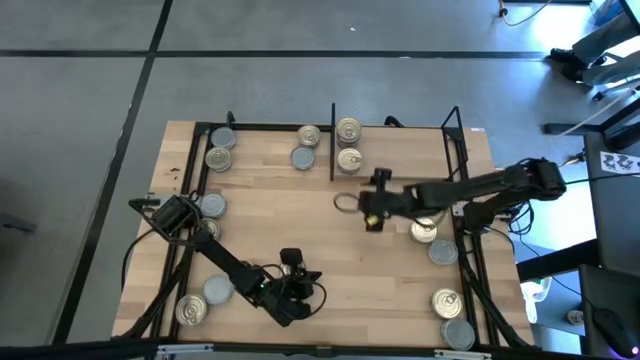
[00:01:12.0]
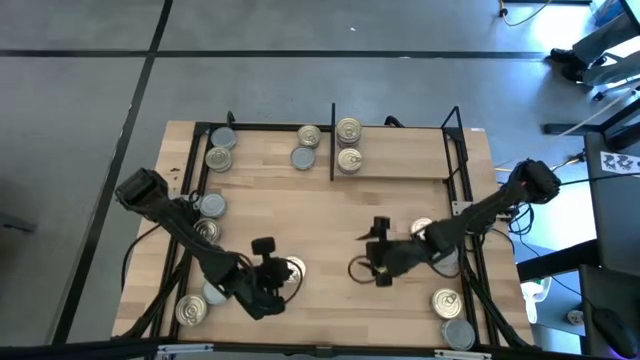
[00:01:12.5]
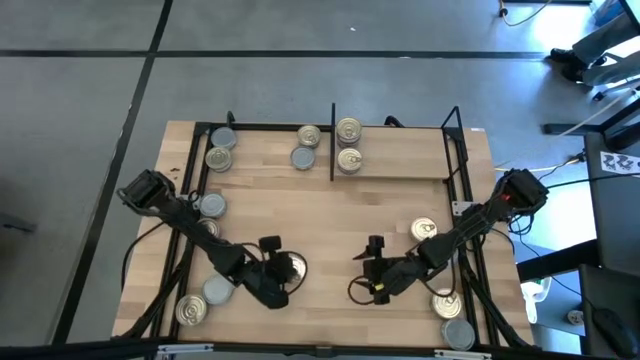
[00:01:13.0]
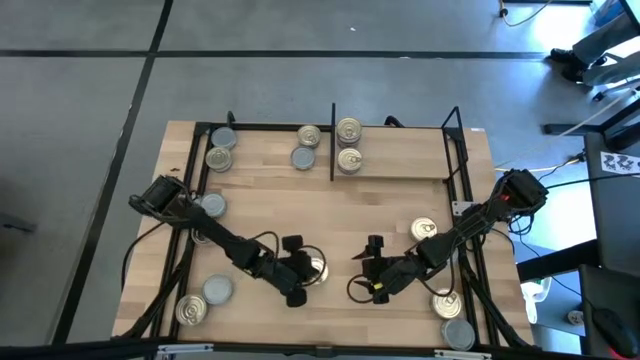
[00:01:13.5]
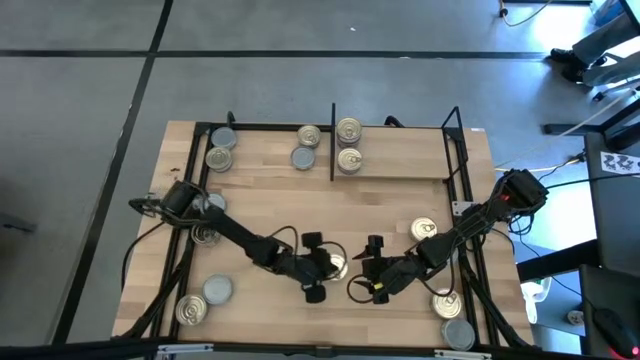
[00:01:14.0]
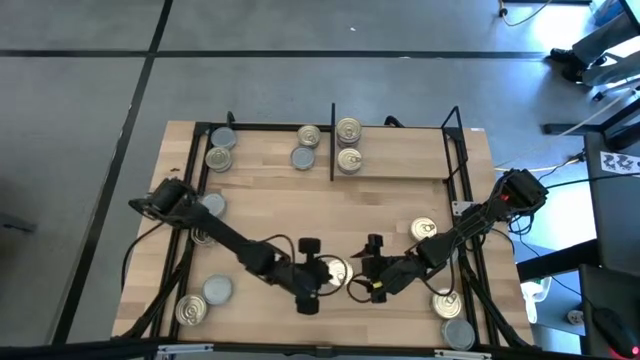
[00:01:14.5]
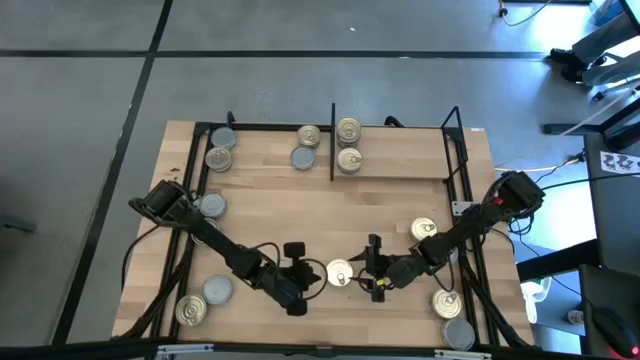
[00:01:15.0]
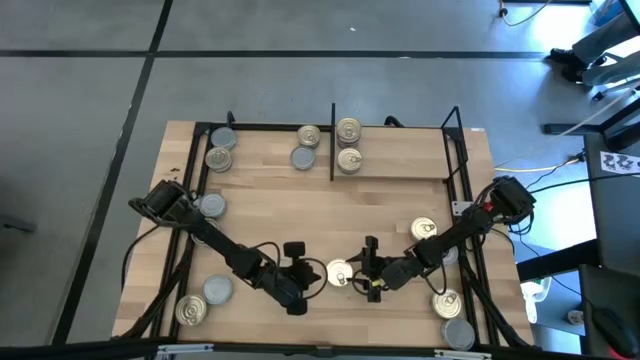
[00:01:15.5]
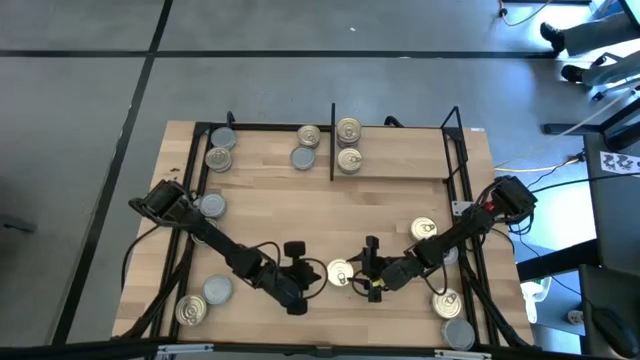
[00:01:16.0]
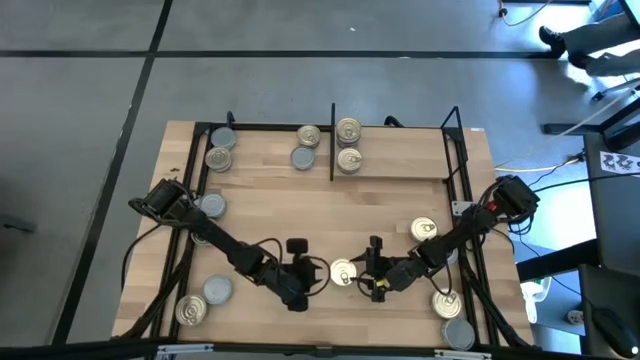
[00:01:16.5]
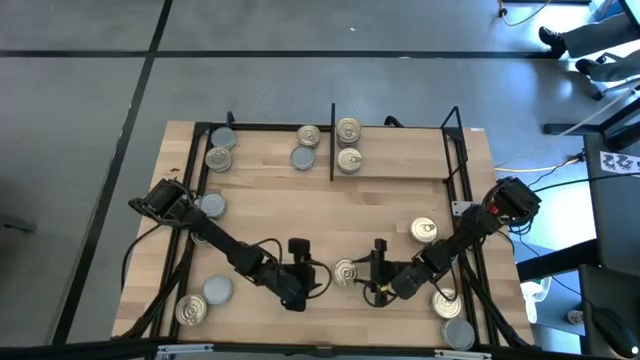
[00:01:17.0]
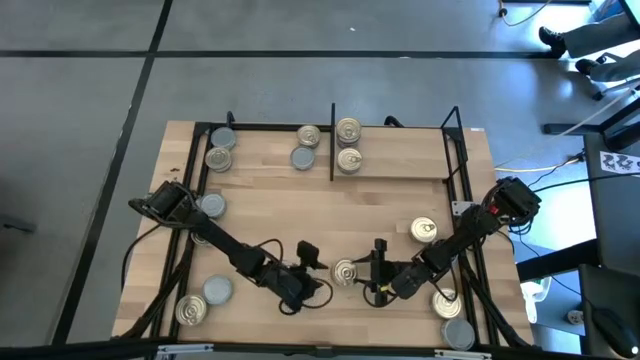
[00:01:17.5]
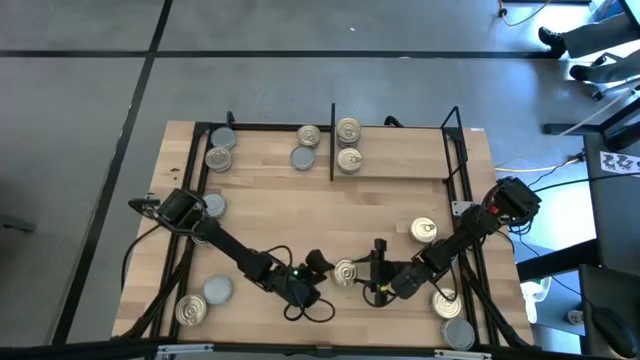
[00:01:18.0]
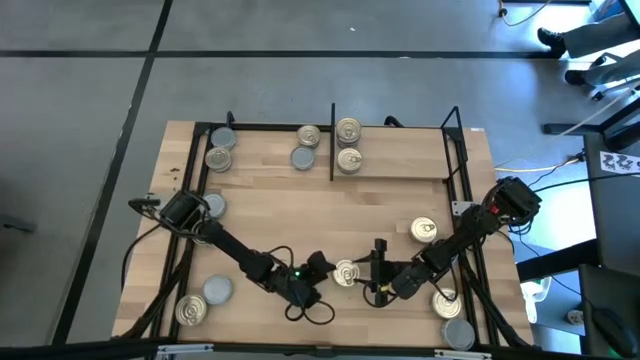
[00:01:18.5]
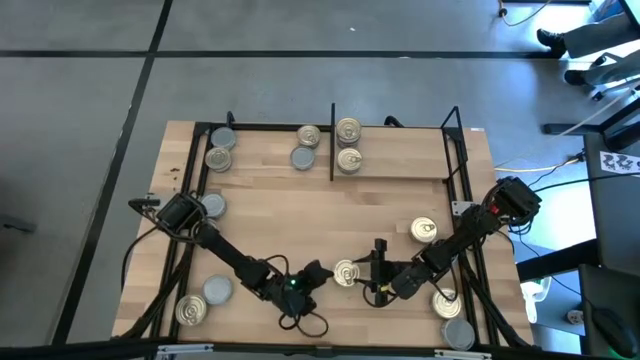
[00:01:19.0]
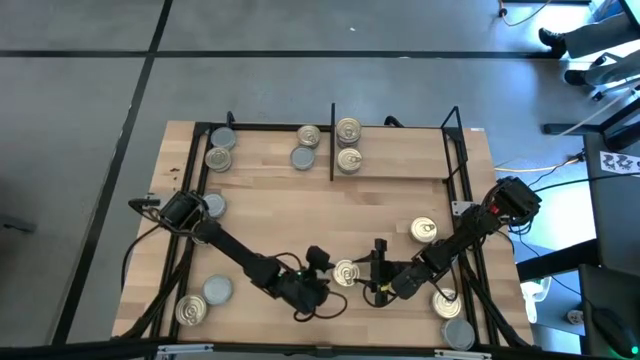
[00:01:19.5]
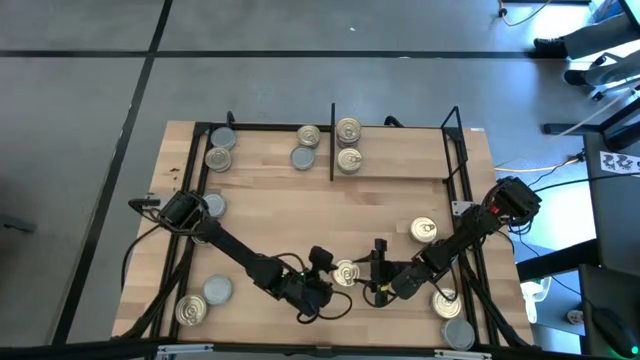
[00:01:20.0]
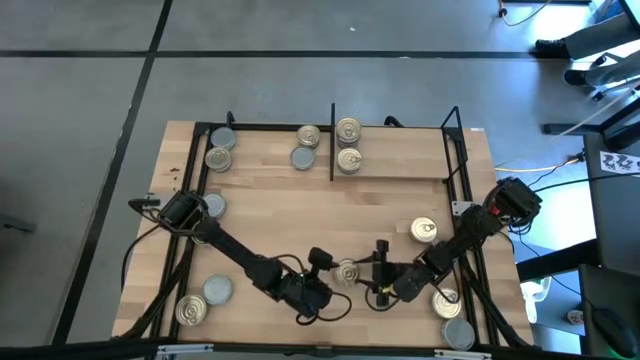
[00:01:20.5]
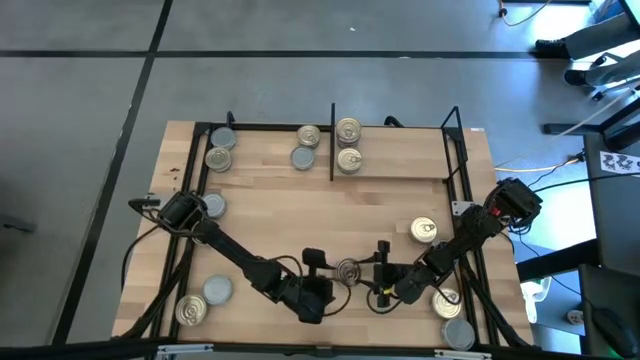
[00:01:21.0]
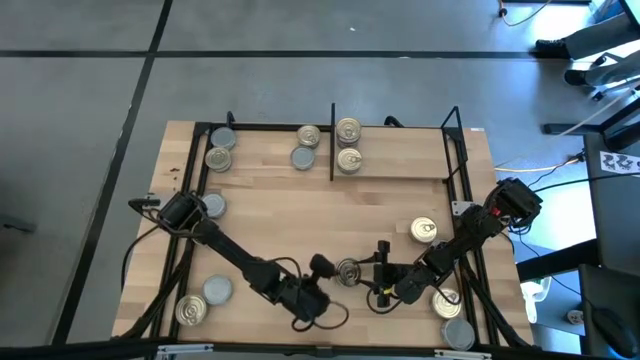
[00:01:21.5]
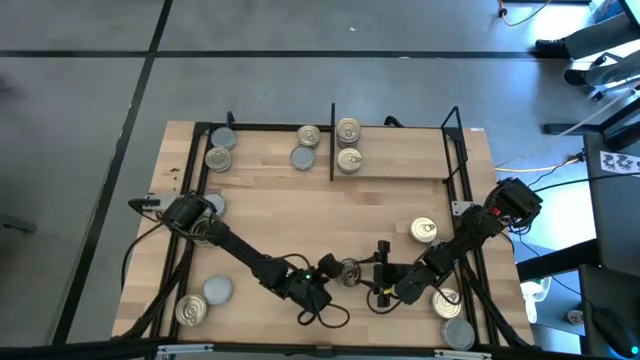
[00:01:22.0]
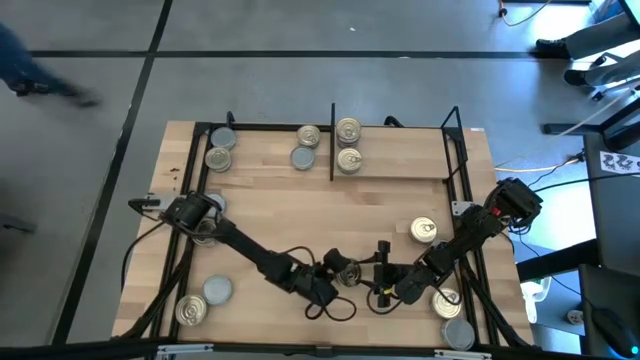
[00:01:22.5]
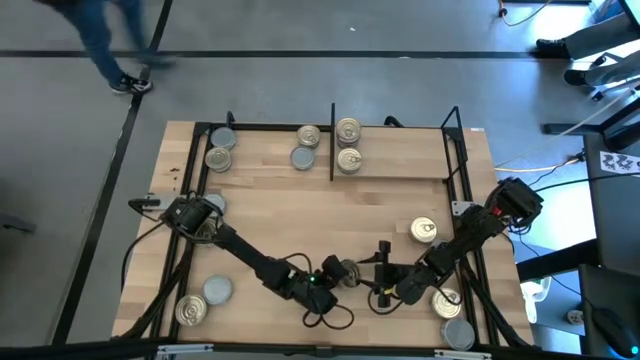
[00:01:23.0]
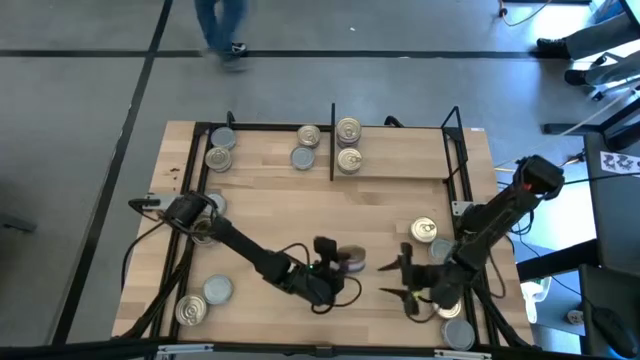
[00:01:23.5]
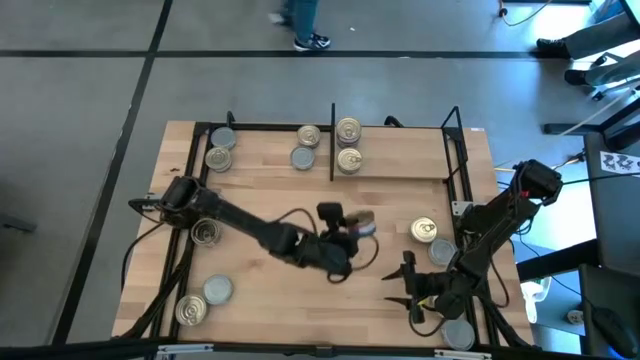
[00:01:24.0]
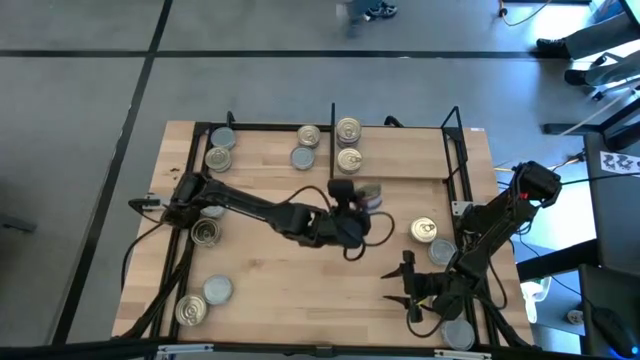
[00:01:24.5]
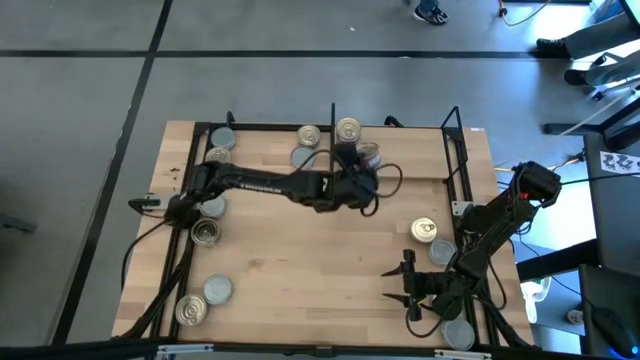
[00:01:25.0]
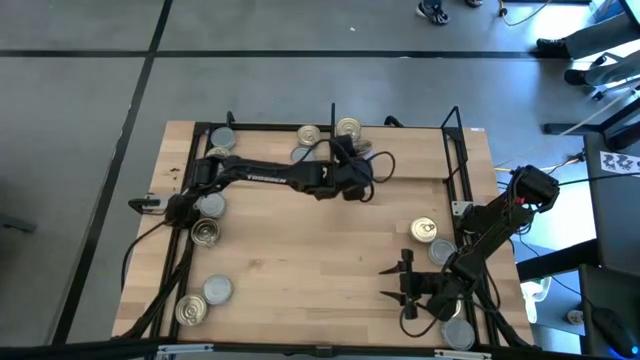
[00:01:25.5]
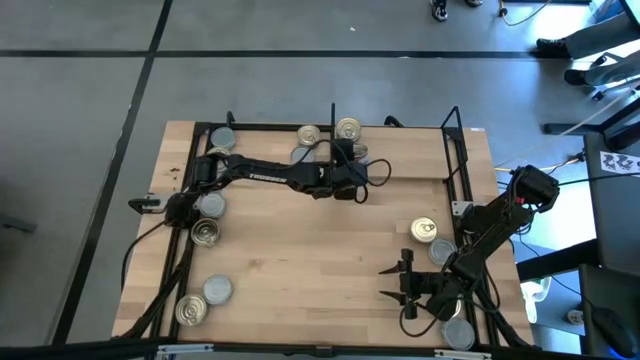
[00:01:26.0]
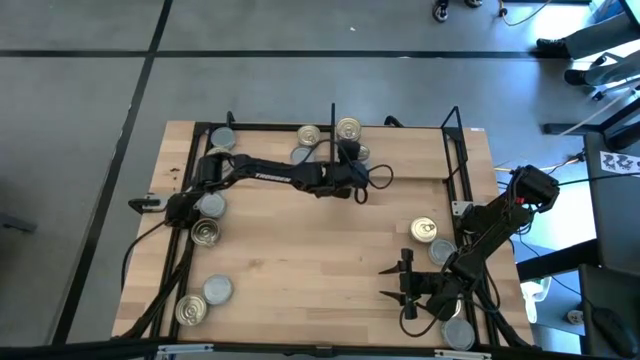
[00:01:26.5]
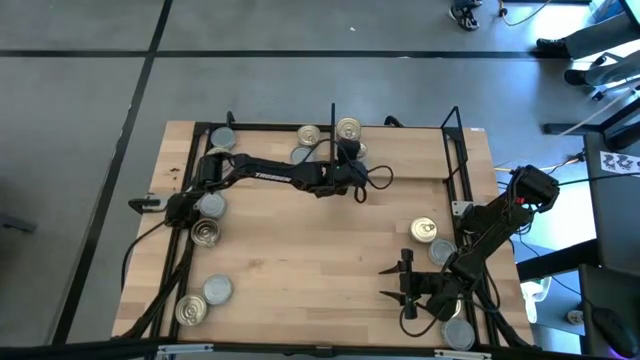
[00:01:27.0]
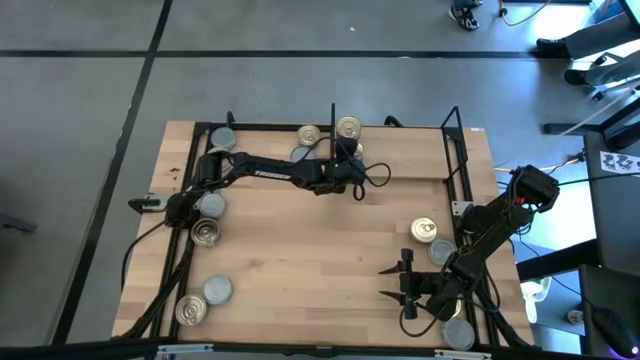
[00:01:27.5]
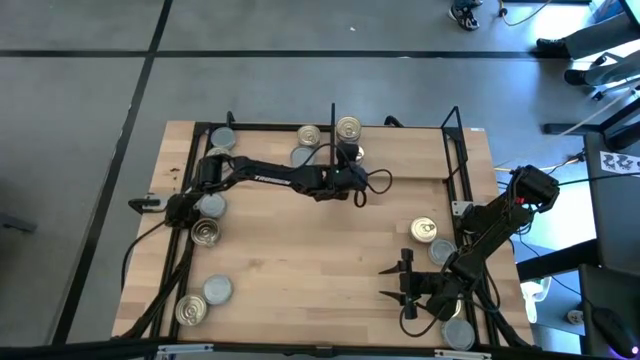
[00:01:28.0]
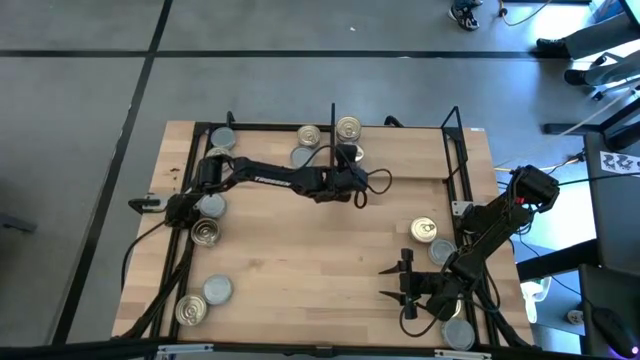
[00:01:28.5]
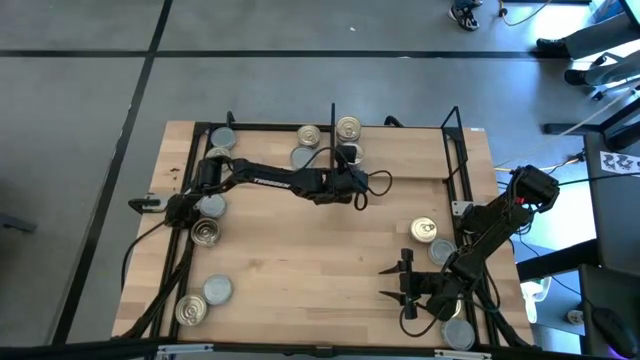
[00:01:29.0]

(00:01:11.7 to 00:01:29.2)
Task: Stack canned seafood by type on shelf
Stack the blue tuna can on top of the blue tuna can

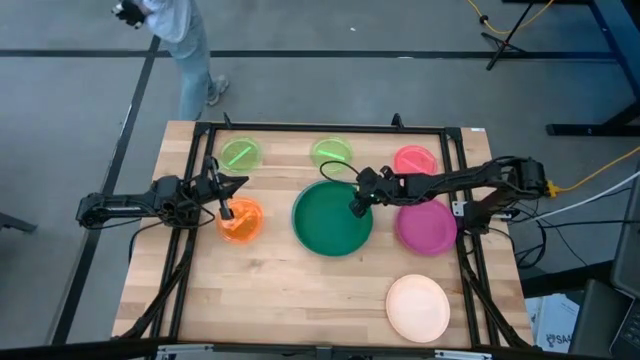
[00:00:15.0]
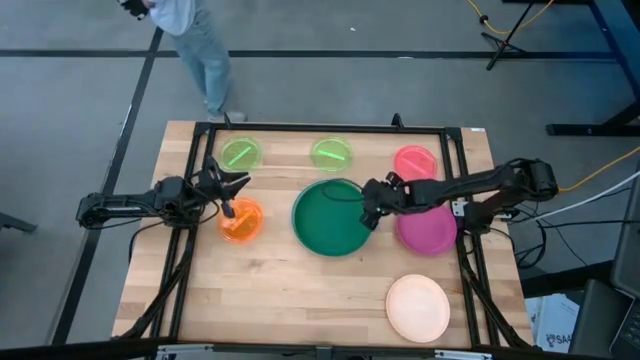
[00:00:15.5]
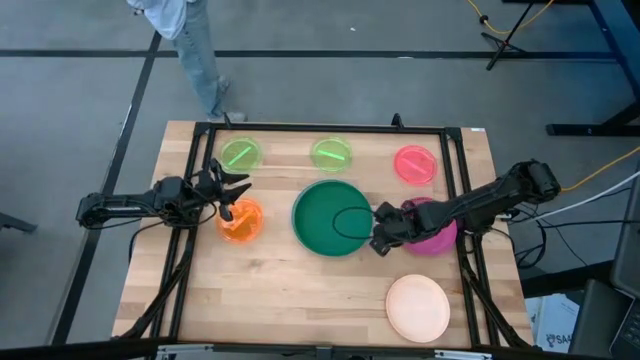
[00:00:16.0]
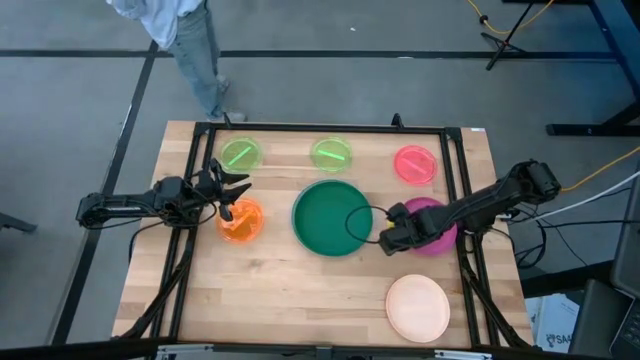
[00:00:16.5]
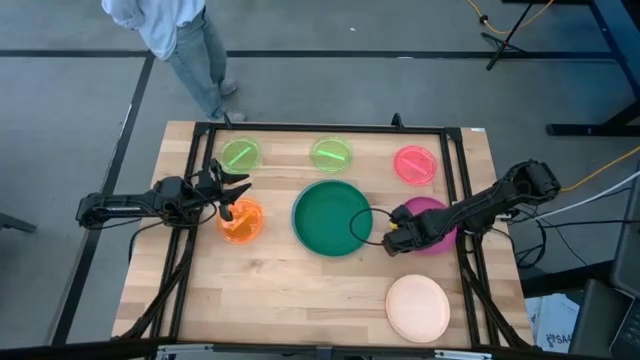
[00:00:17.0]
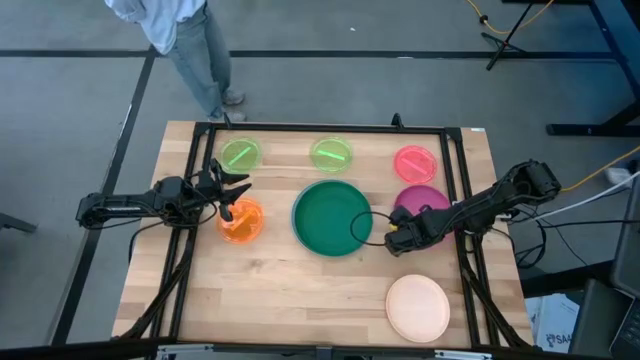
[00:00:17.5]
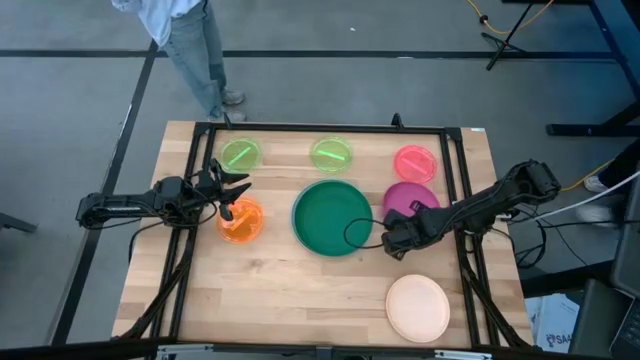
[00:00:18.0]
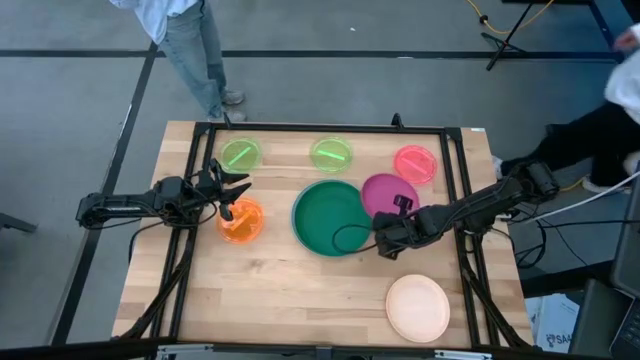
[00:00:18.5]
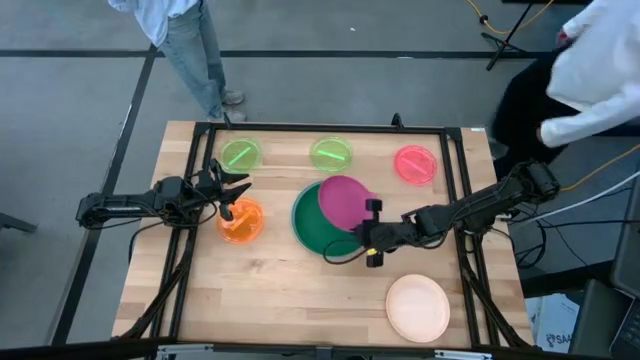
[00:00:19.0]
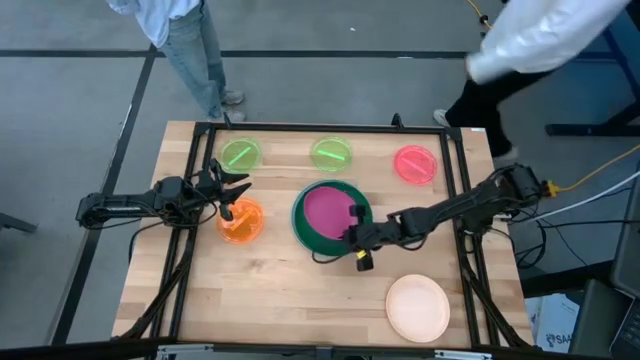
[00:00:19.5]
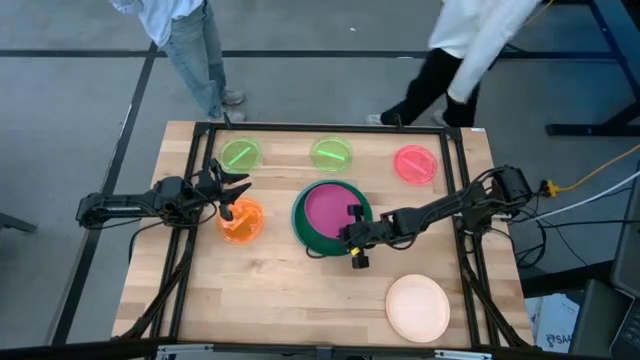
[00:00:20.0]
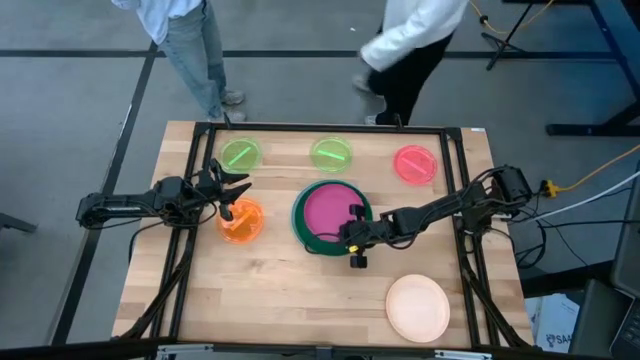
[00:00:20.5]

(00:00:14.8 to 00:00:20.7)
Task: Stack plastic plates
Stack the pink plate on the dark green plate
